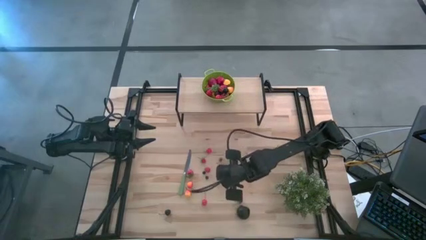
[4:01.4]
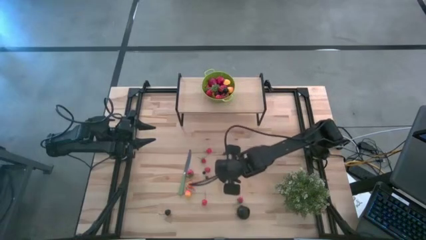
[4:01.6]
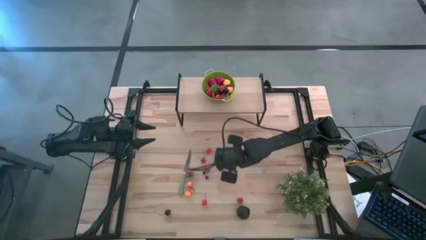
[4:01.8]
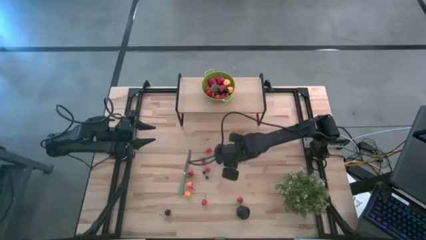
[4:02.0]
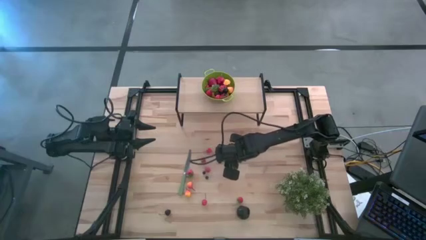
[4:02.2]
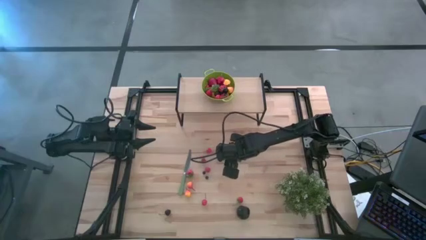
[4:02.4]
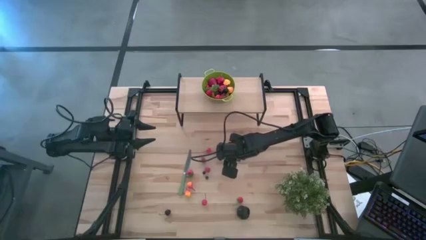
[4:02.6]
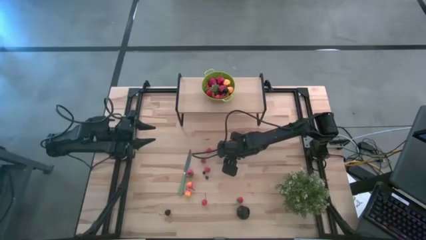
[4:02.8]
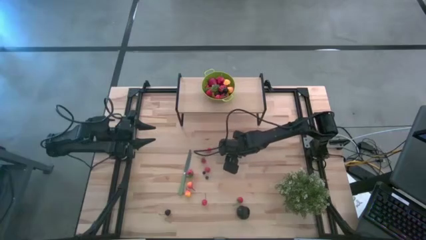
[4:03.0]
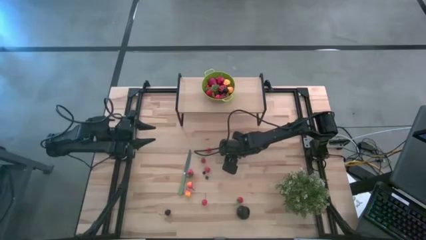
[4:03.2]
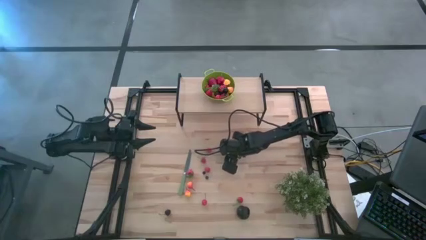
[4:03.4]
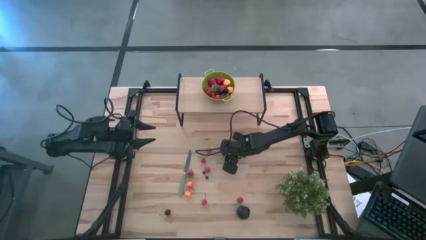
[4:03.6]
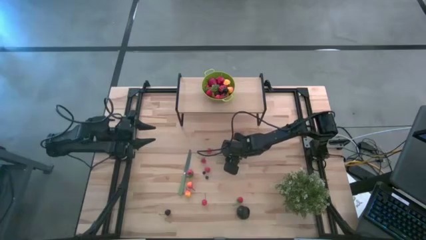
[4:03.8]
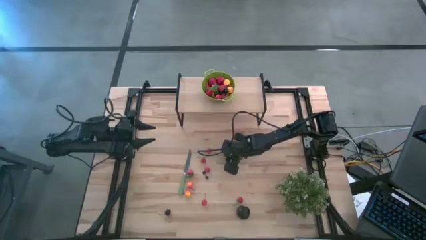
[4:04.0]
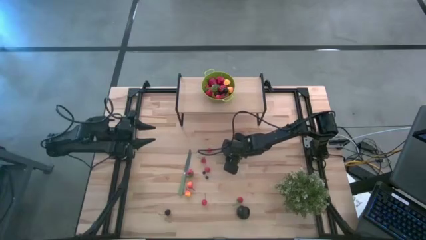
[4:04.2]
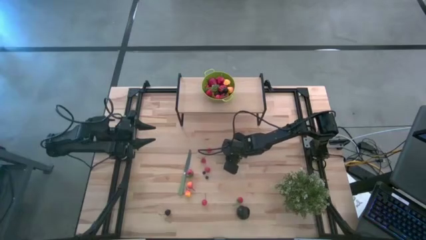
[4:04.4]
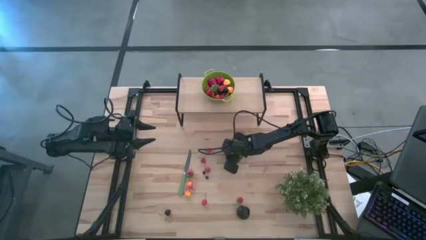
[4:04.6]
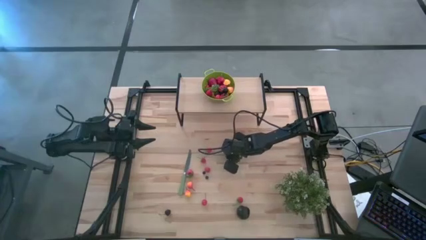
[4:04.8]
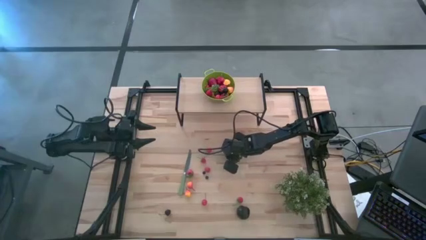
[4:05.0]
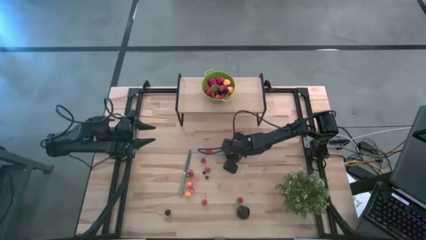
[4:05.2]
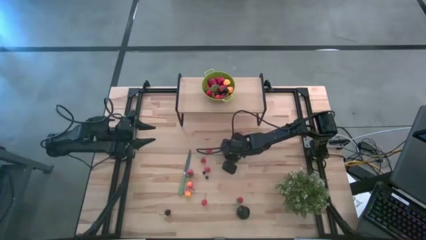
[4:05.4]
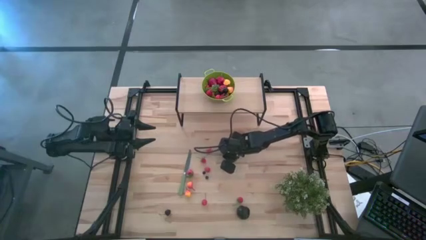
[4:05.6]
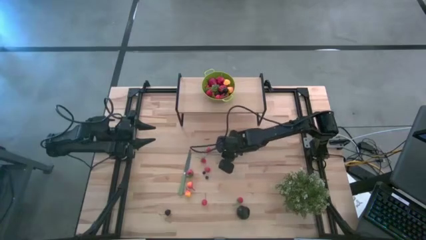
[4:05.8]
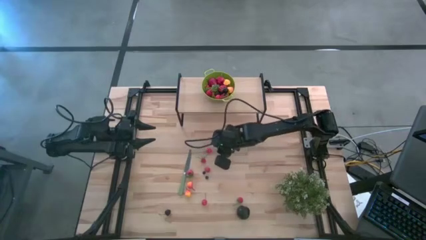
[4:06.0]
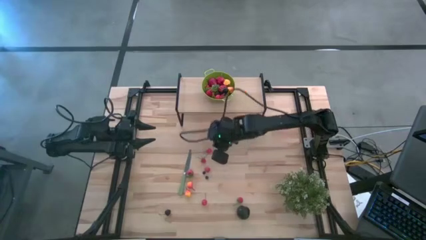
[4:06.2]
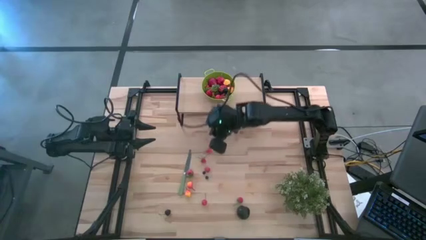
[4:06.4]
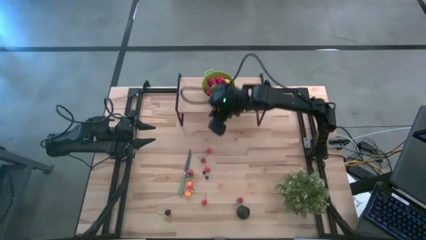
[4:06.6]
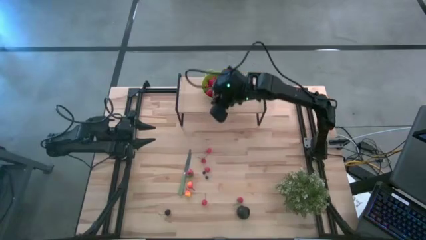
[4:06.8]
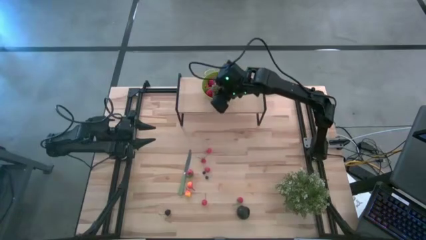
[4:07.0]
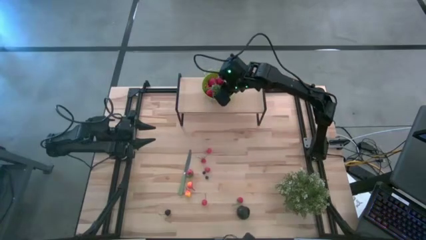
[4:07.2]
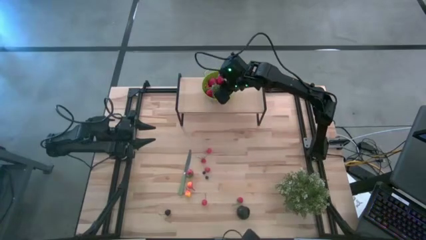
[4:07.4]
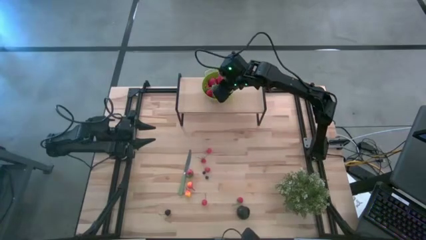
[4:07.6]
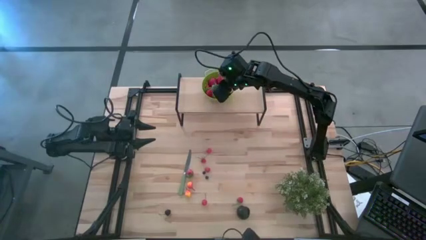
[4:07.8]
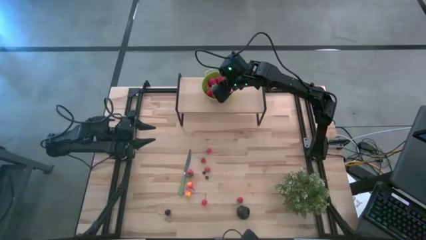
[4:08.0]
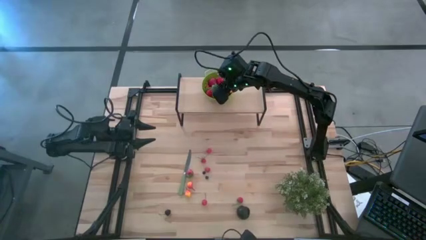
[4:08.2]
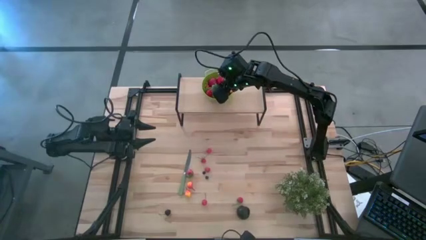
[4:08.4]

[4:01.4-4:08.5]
Task: Pick & Place Fruit
Put the blueberry into the green colander on the shelf

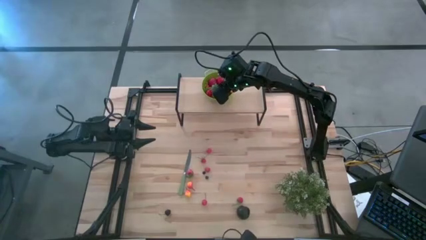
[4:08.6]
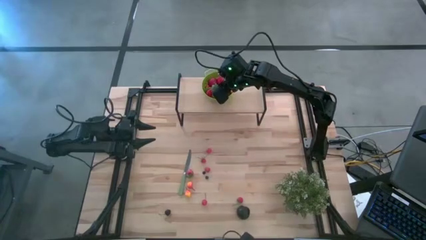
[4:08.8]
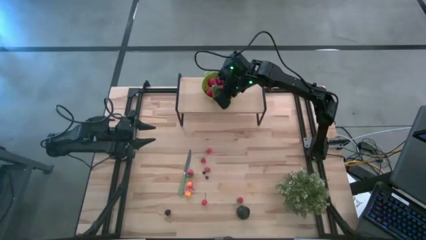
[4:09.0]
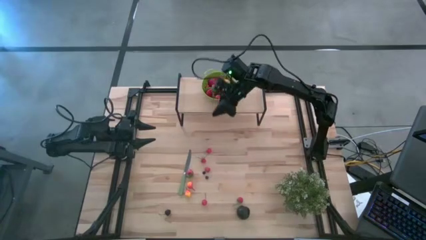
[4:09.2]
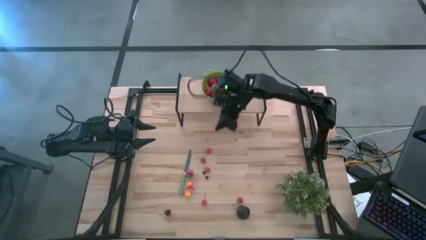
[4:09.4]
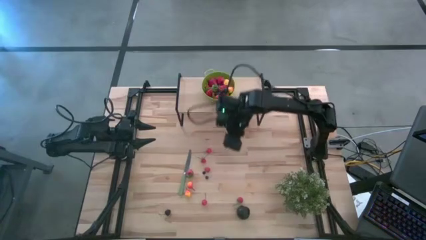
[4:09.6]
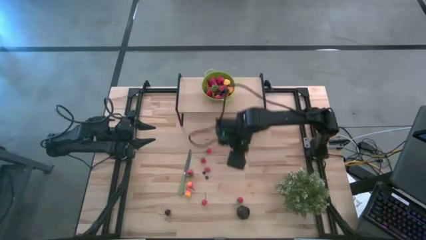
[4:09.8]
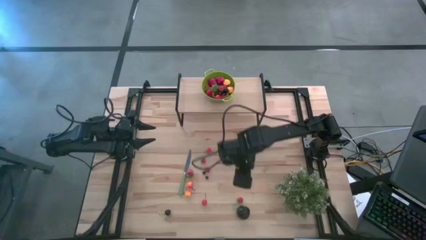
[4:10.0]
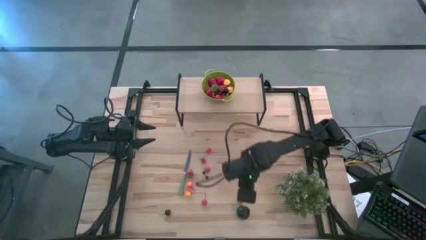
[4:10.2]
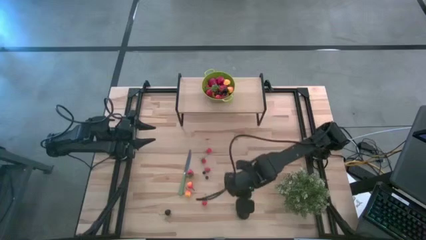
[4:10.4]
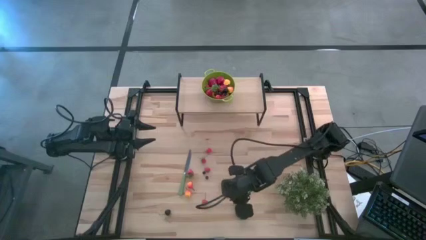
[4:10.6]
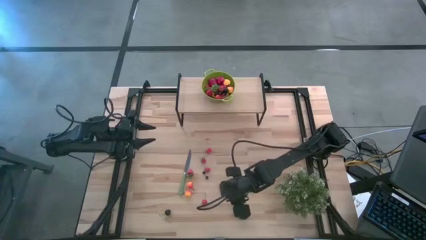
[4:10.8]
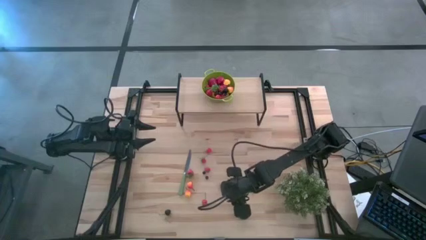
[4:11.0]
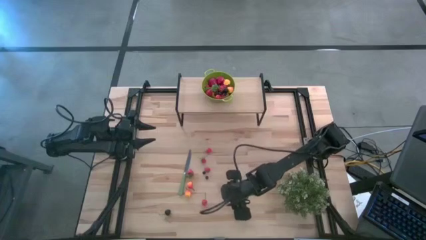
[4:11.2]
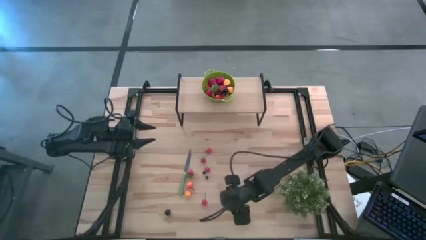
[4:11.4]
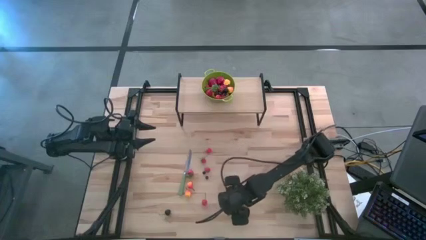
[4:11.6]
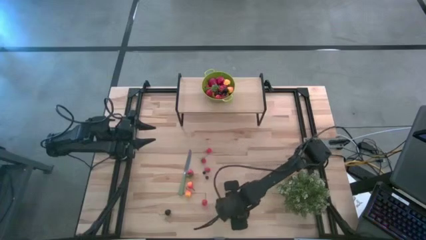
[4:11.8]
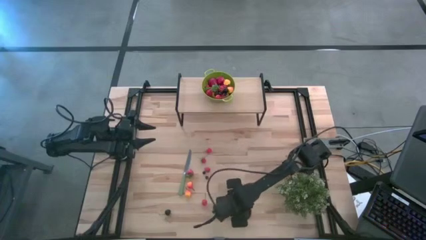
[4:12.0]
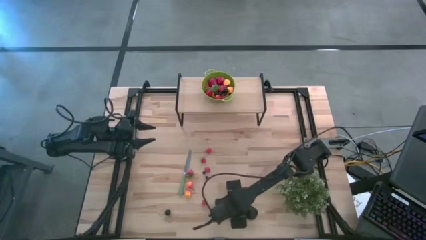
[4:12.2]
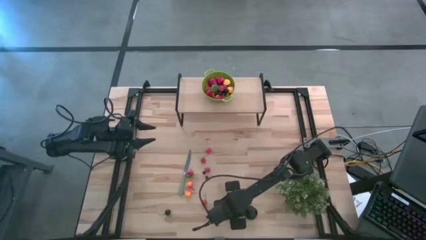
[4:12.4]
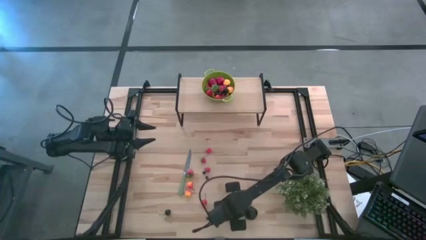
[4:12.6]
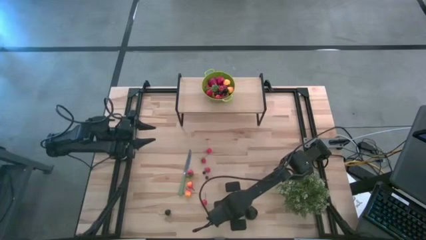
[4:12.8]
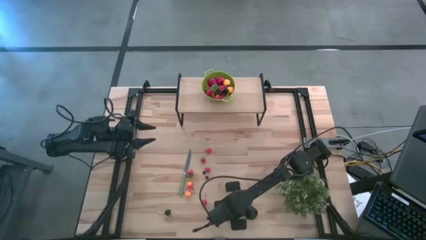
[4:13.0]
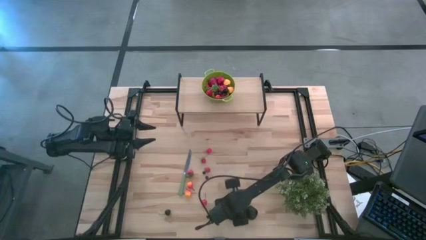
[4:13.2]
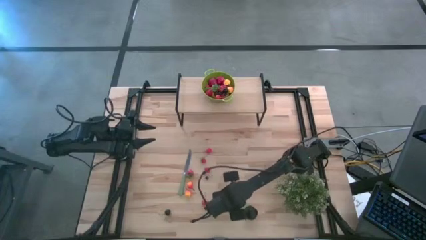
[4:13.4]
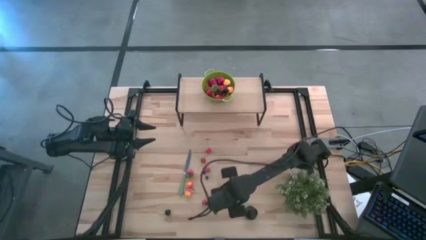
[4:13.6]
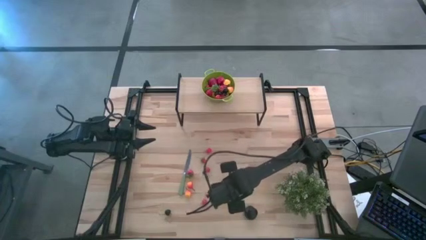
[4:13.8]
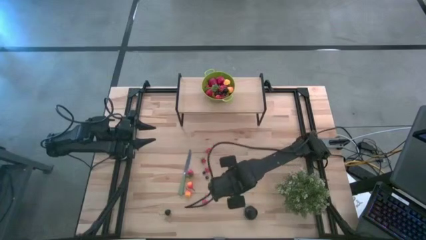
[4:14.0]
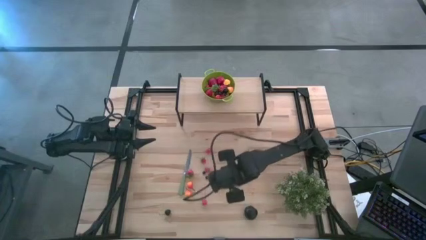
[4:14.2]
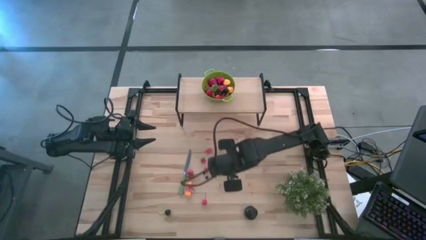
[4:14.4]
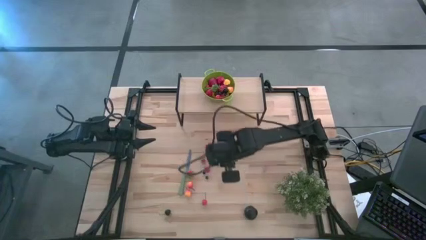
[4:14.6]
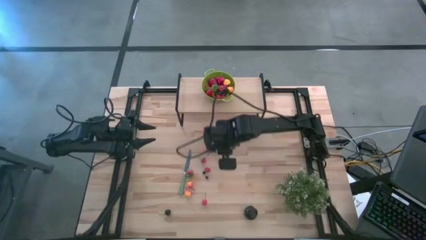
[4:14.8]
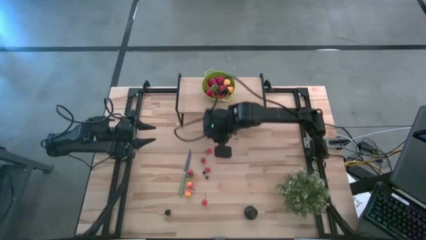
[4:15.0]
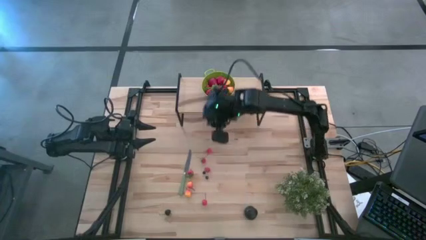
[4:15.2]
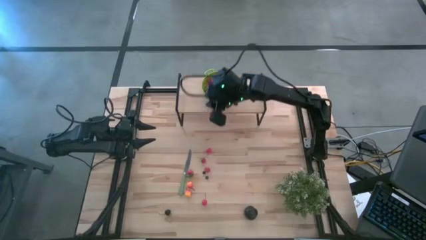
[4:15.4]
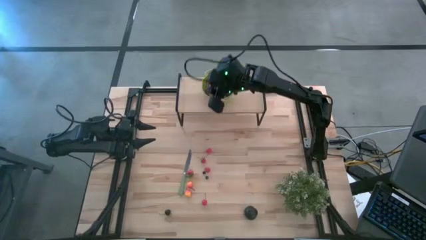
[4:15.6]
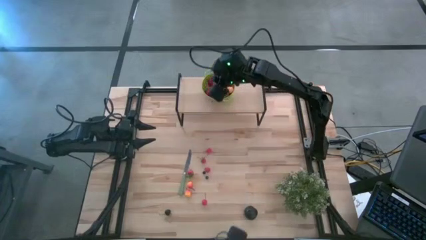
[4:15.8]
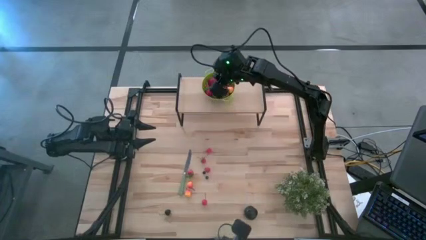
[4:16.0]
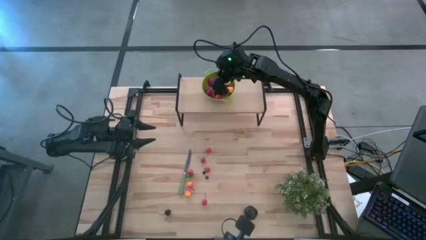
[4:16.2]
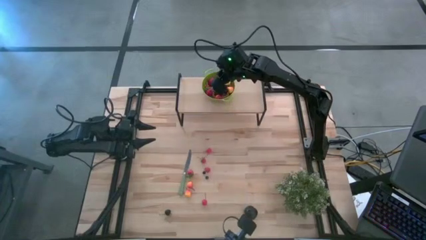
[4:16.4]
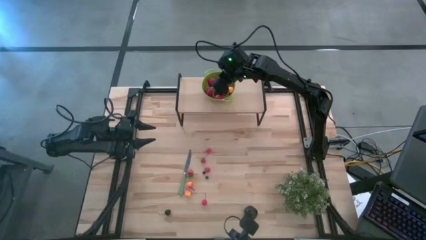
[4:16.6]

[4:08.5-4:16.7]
Put the strawberry into the green colander on the shelf
